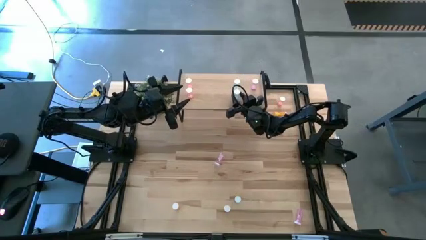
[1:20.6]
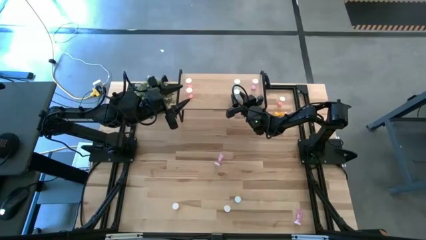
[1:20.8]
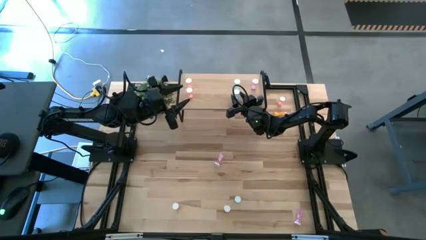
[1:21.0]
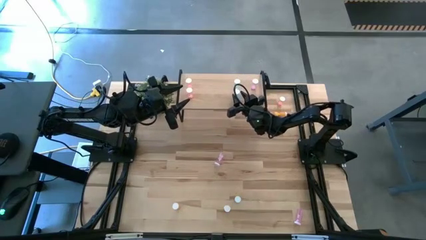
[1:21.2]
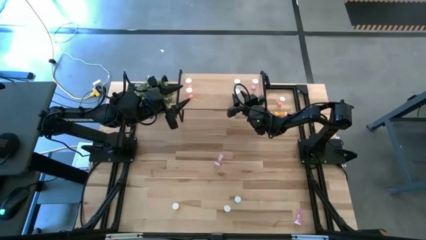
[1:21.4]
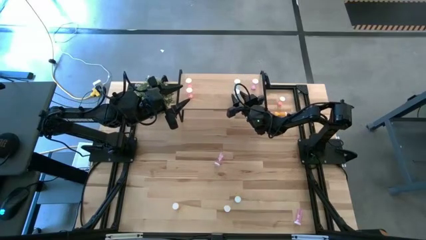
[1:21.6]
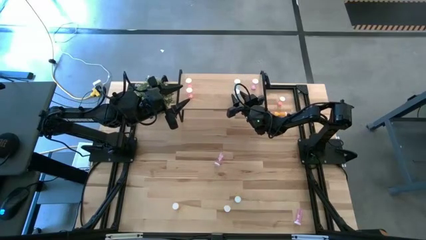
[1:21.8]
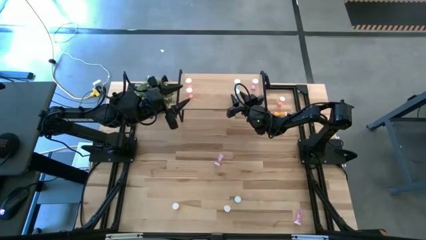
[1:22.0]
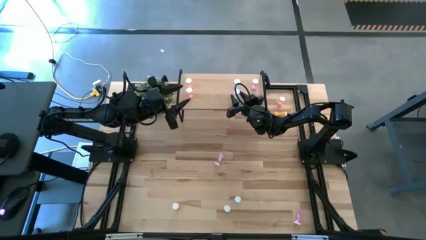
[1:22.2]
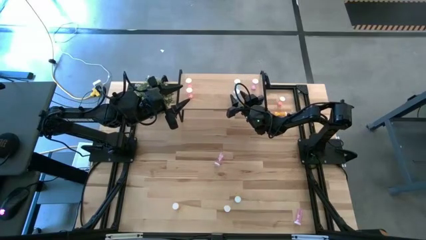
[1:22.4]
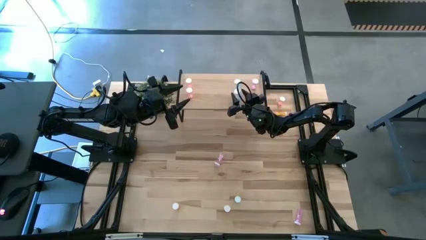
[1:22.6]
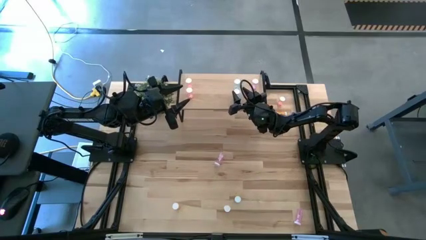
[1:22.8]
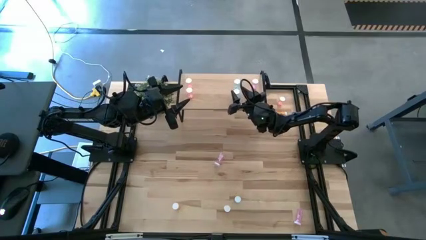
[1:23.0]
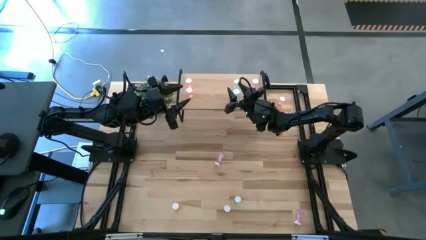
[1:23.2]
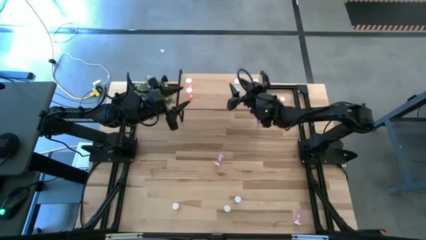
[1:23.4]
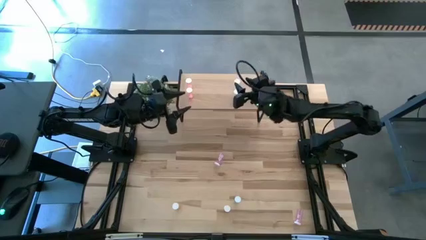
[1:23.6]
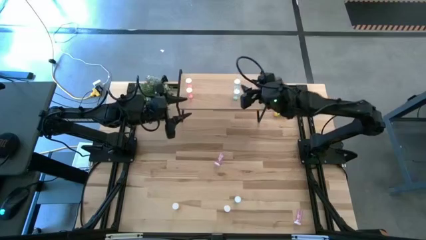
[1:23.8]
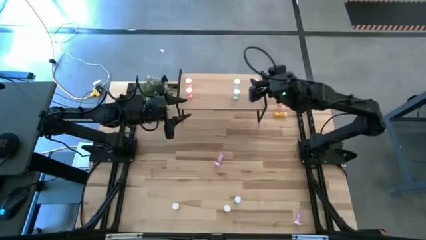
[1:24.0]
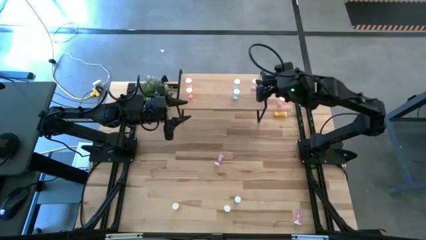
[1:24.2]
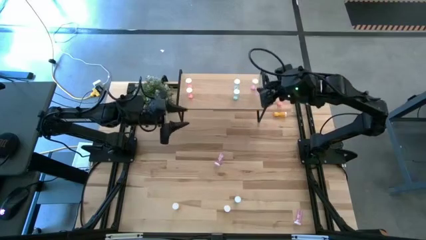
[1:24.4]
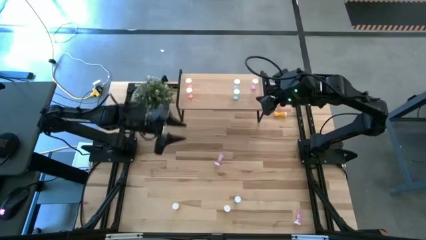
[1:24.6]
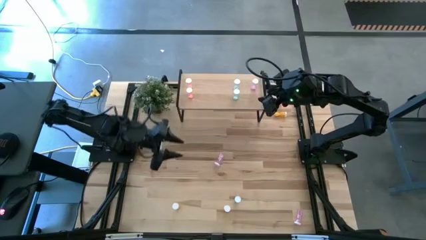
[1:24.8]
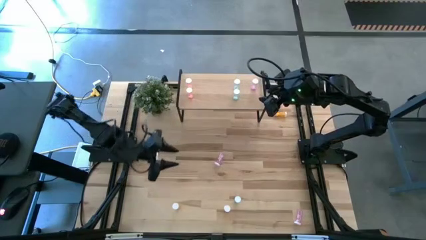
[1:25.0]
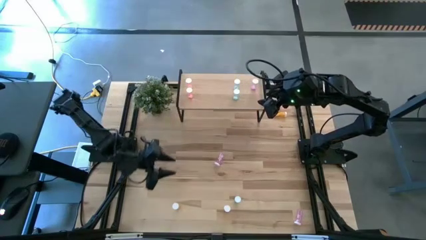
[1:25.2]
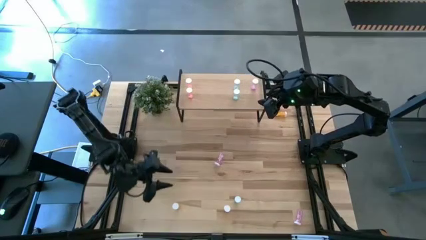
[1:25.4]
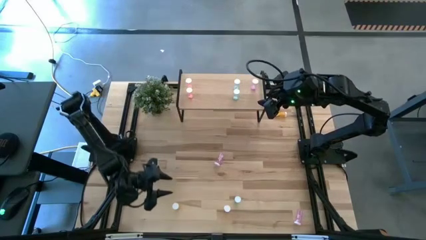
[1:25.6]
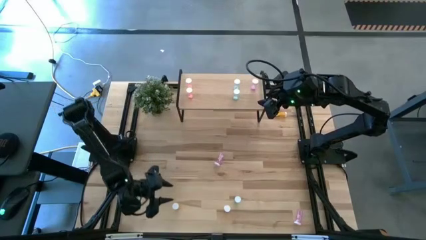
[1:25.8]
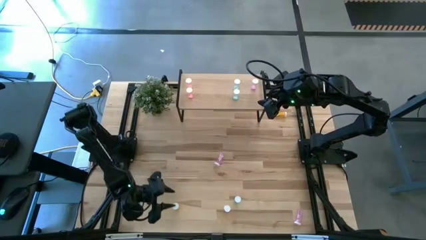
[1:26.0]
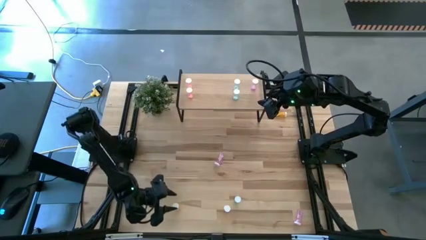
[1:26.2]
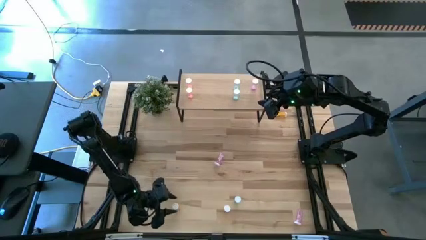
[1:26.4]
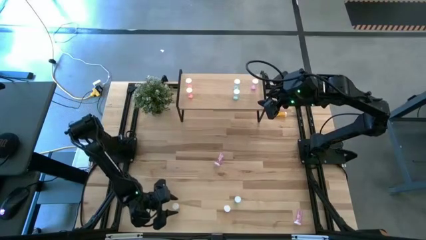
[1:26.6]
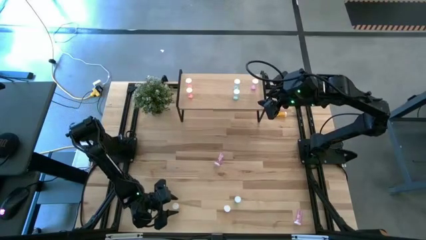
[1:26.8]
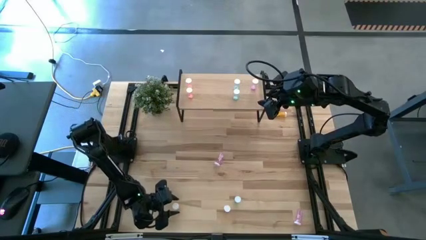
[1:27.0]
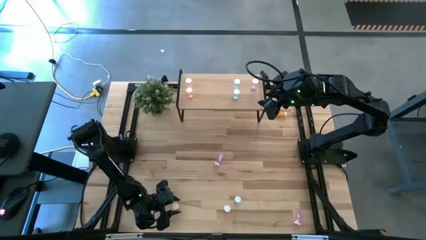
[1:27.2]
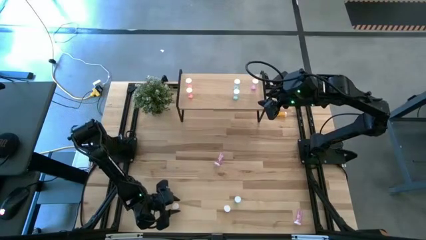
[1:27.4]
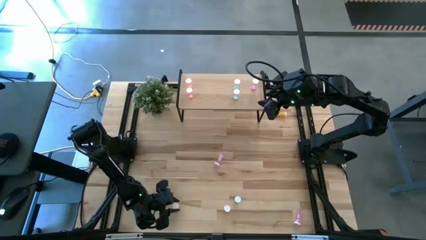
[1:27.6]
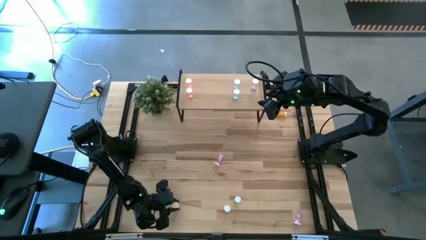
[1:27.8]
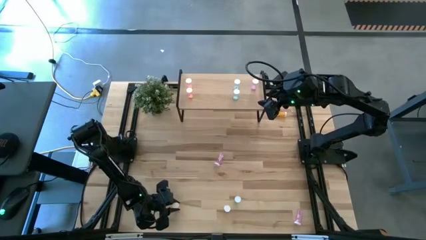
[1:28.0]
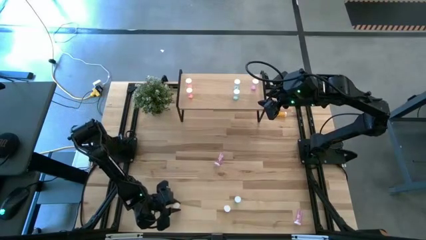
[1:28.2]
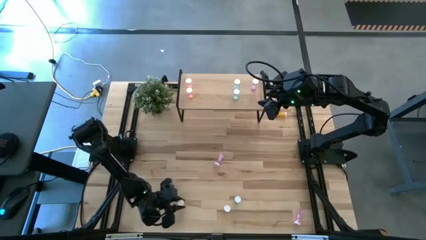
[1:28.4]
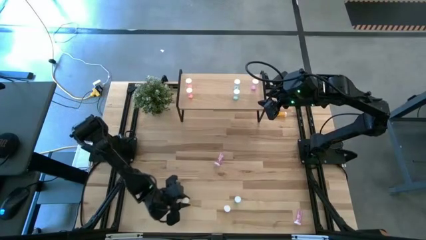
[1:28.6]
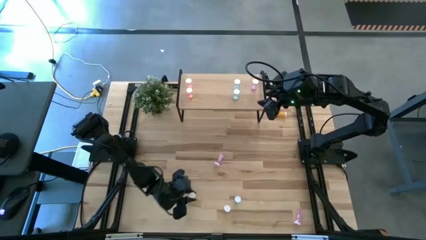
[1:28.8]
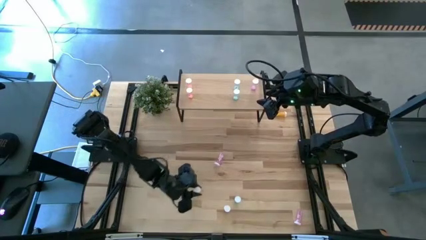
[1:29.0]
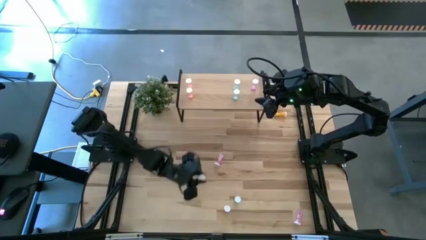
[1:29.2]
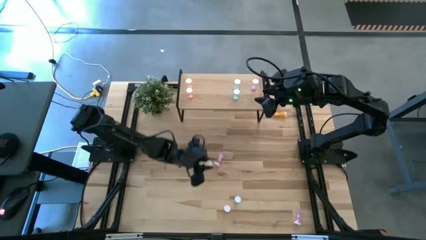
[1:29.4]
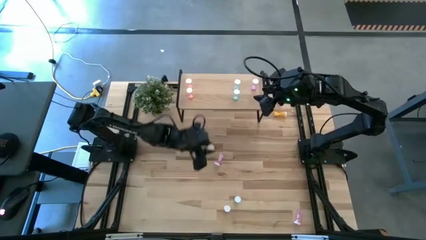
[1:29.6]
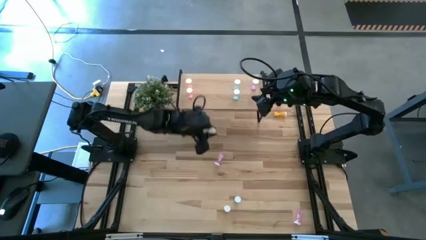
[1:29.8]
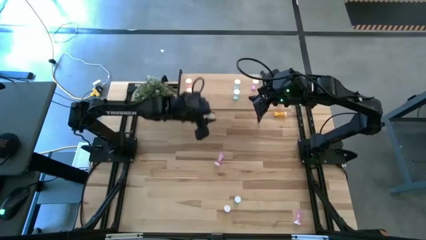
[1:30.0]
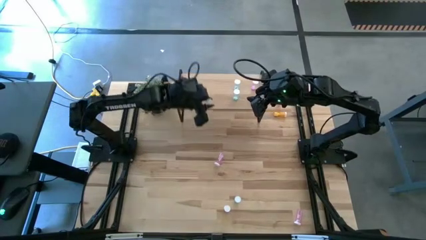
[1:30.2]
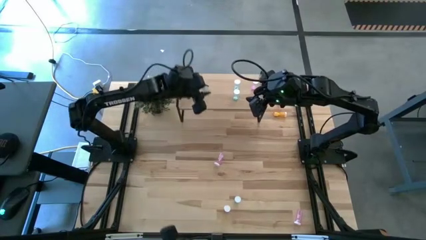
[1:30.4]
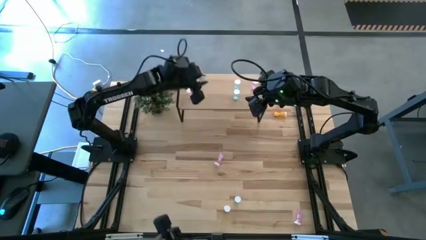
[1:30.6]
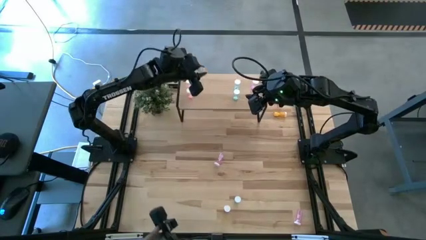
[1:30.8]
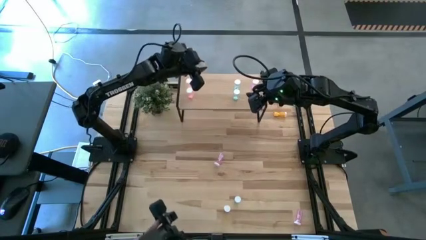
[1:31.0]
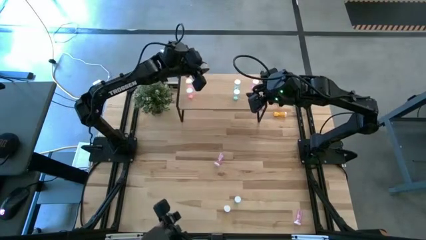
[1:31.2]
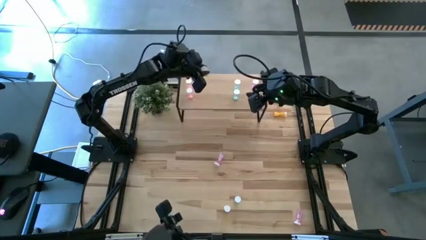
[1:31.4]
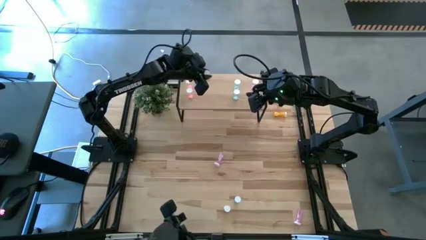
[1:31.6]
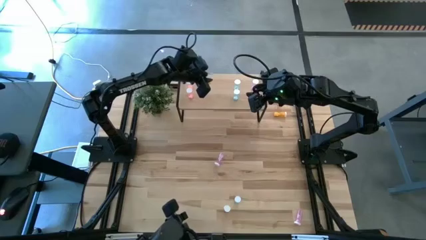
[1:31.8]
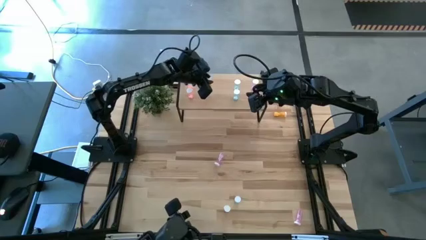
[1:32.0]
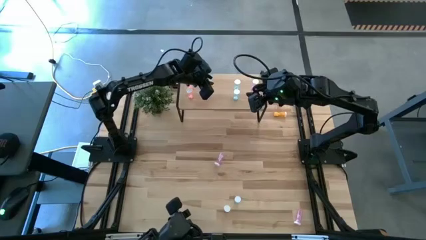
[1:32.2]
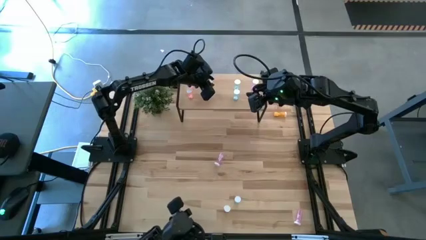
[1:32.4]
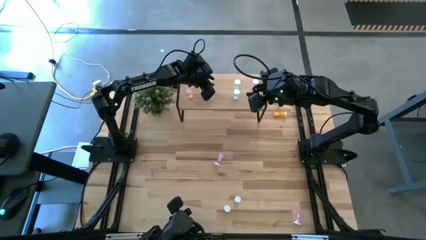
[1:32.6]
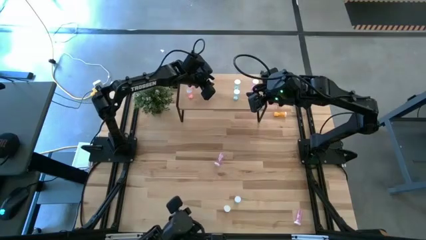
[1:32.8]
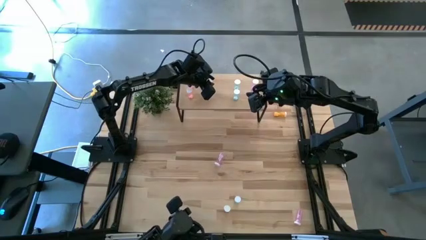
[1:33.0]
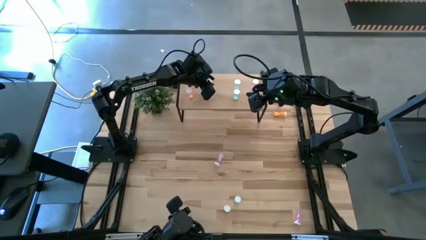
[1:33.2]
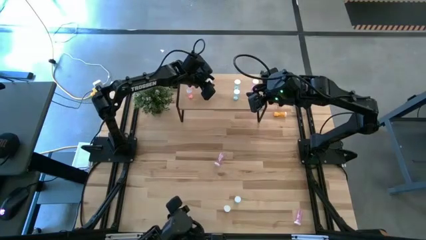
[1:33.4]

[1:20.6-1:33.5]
Task: Pick and place medicine bottles onto shelf by color
Put the left orange pill bottle on the shelf
